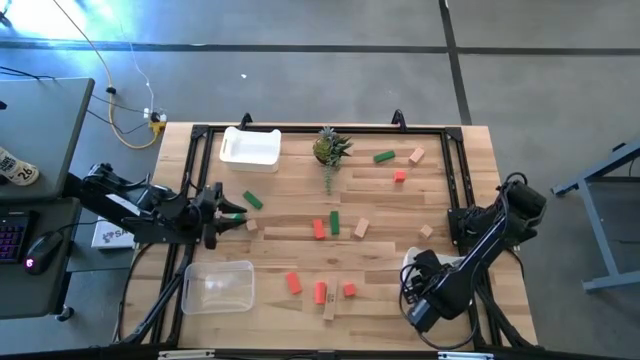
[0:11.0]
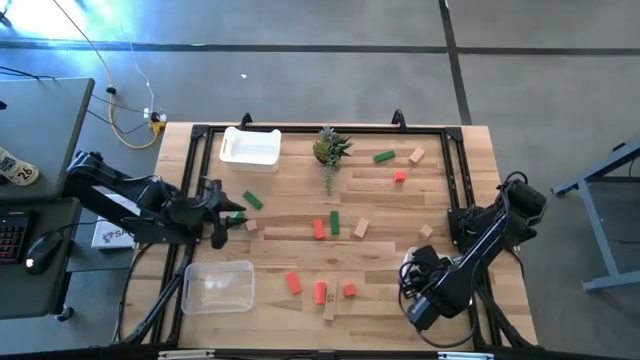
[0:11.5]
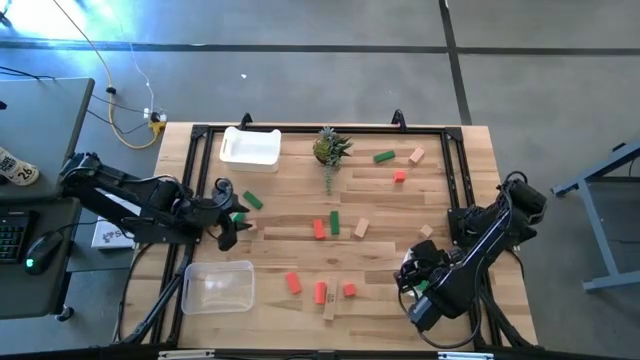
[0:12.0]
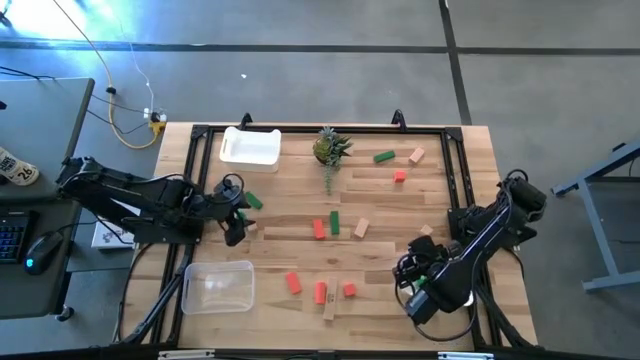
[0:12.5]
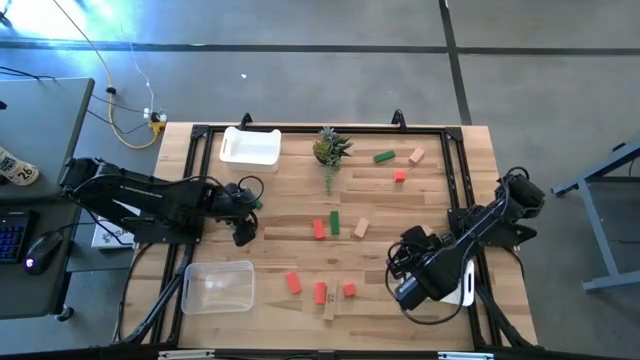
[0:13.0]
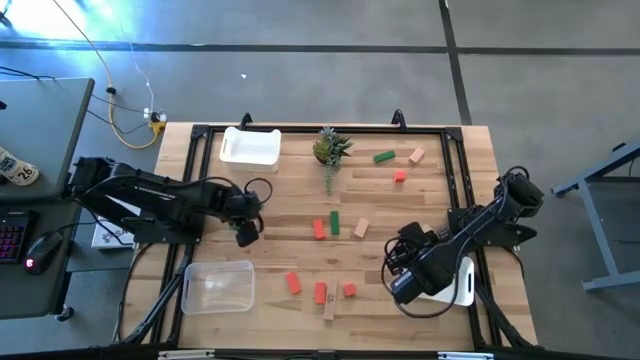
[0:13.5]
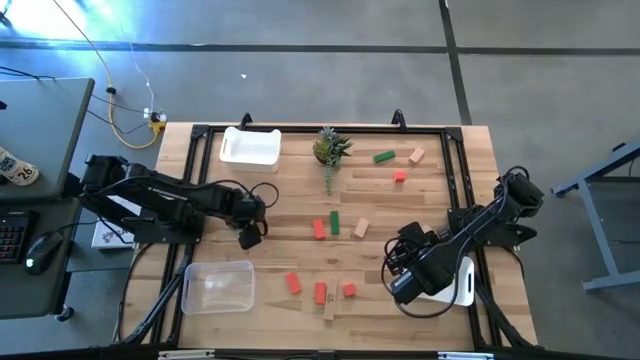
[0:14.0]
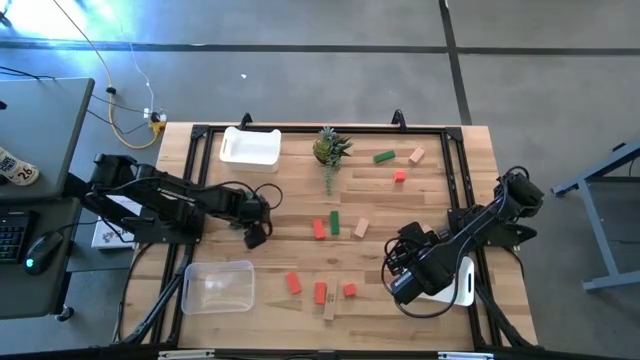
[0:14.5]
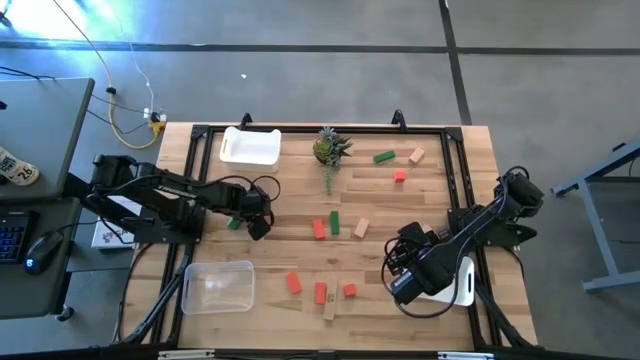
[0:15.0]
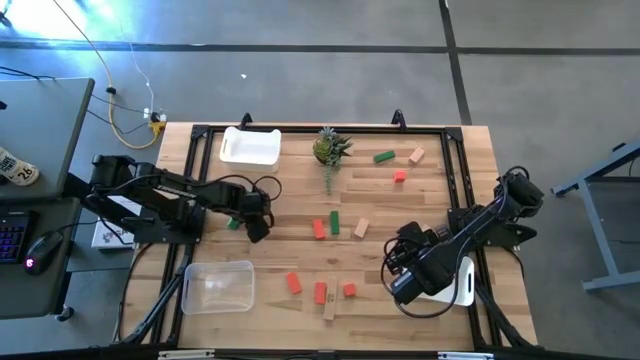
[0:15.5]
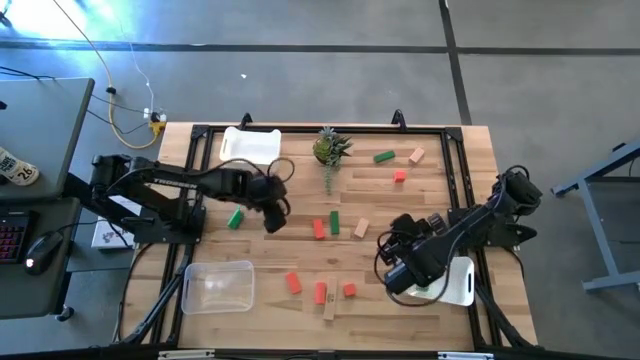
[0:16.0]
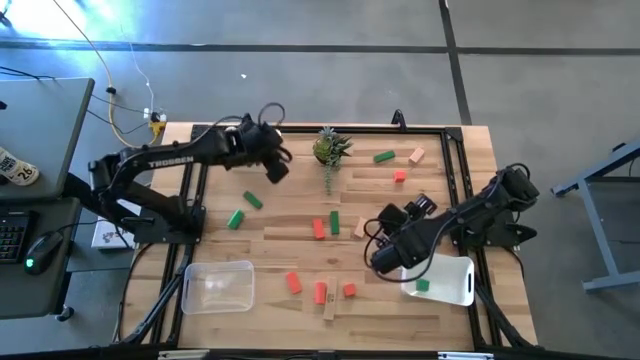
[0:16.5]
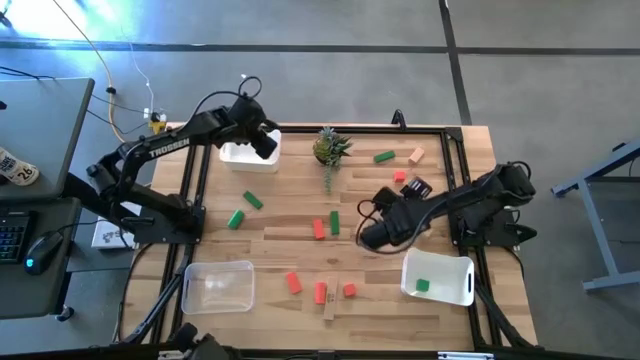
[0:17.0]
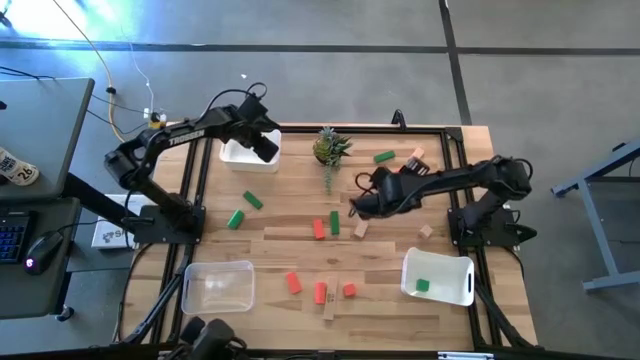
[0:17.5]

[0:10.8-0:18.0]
Task: Sort & place blocks by color
Put the brown block into the top white bin

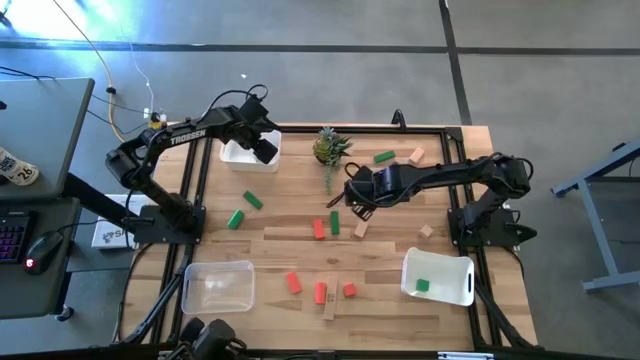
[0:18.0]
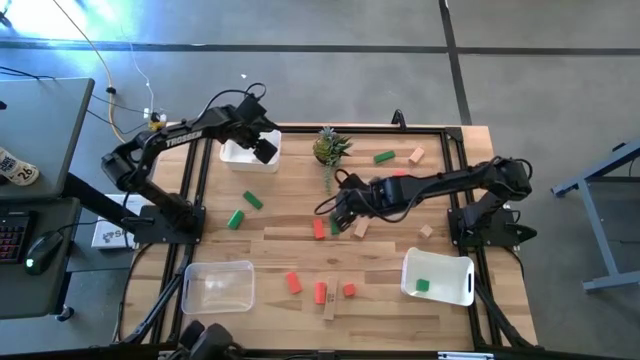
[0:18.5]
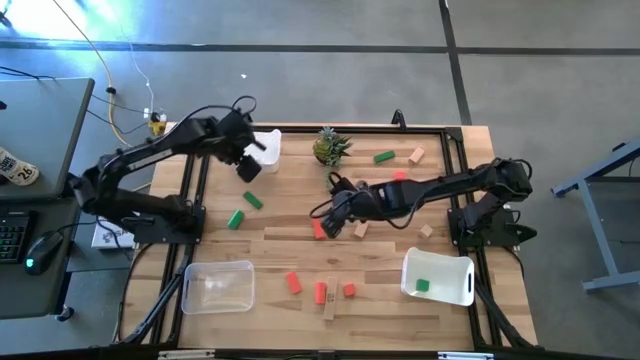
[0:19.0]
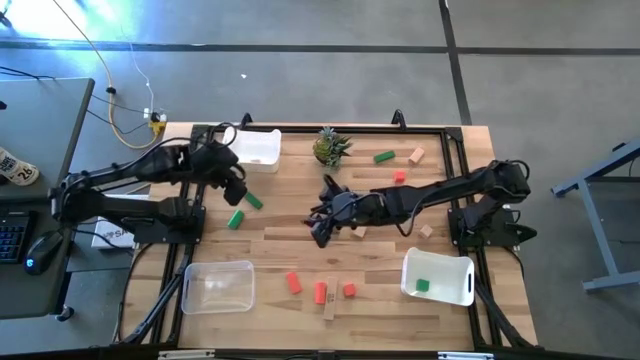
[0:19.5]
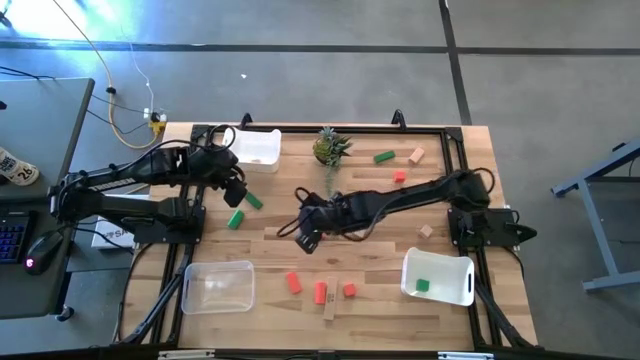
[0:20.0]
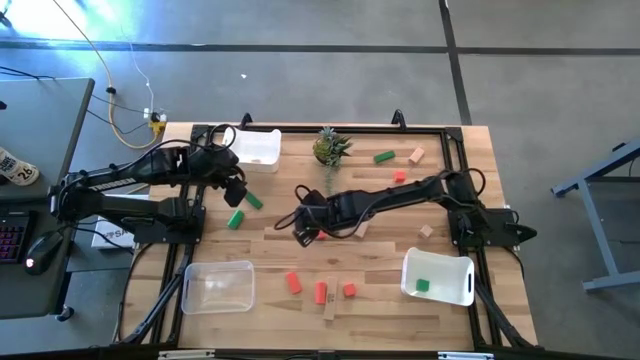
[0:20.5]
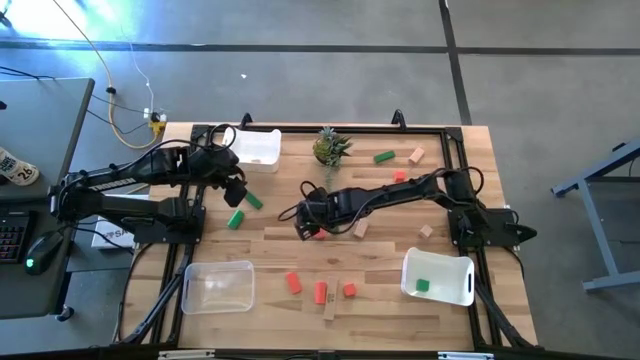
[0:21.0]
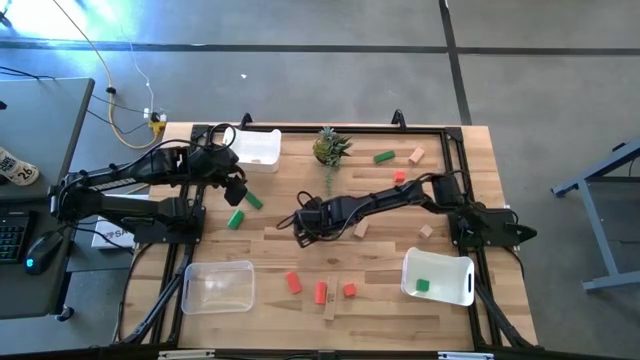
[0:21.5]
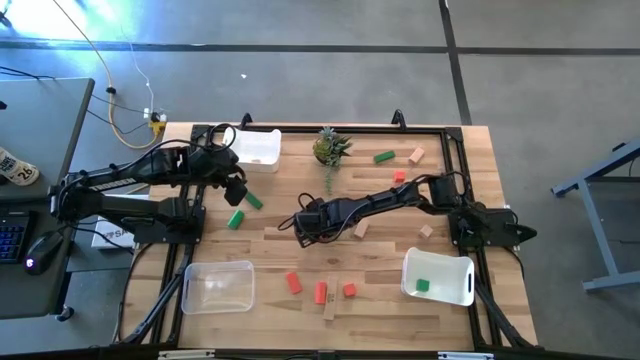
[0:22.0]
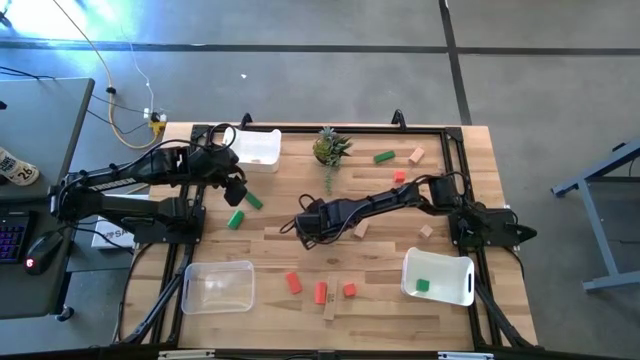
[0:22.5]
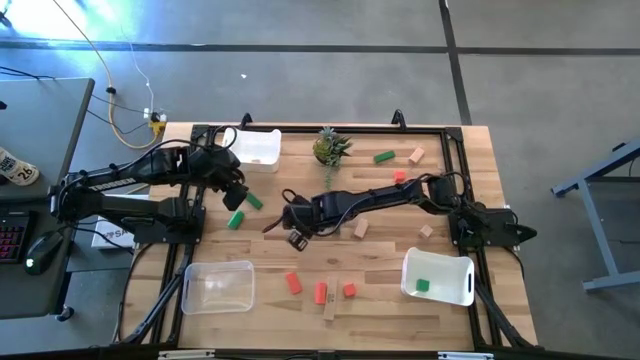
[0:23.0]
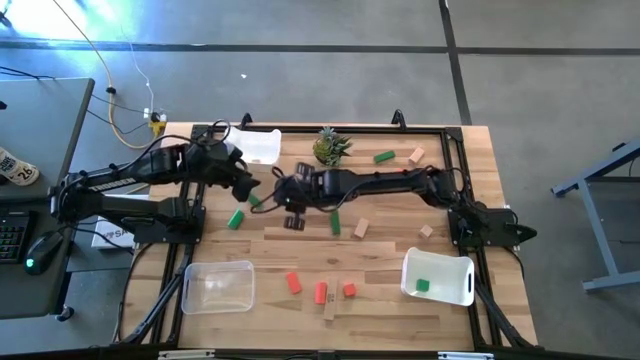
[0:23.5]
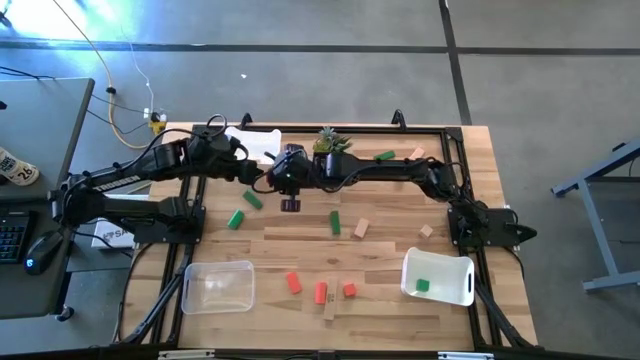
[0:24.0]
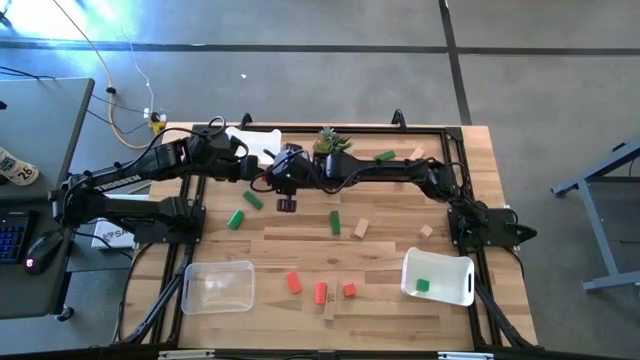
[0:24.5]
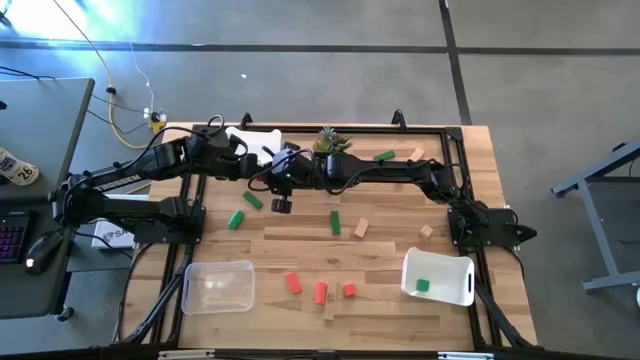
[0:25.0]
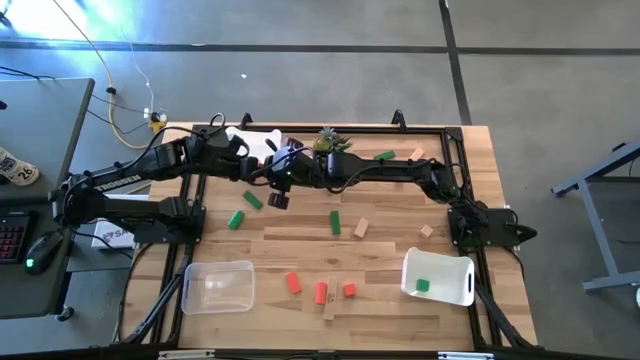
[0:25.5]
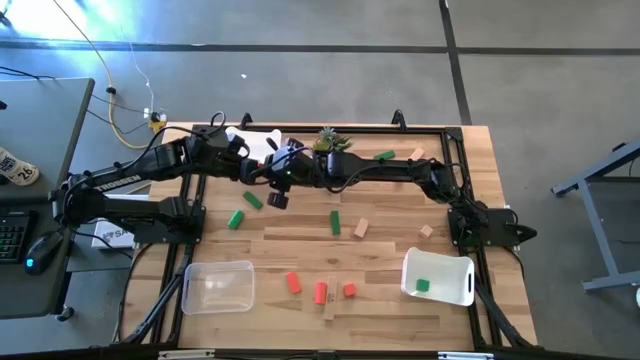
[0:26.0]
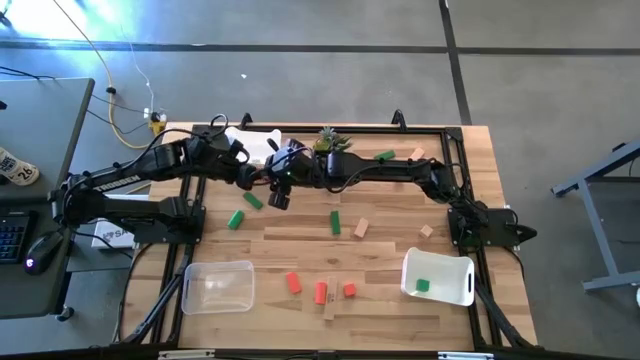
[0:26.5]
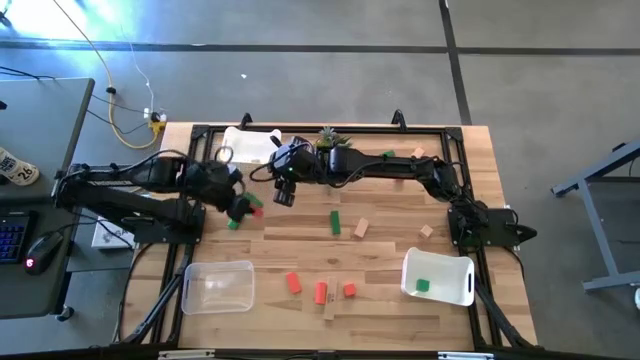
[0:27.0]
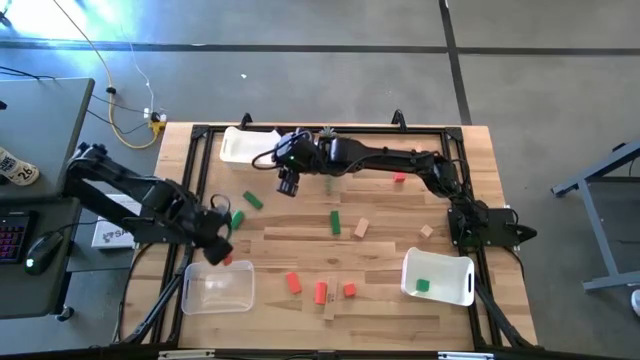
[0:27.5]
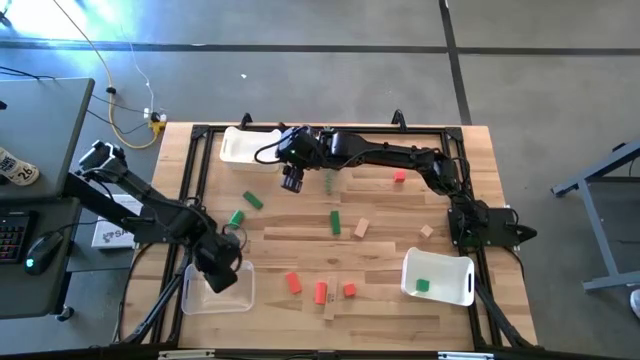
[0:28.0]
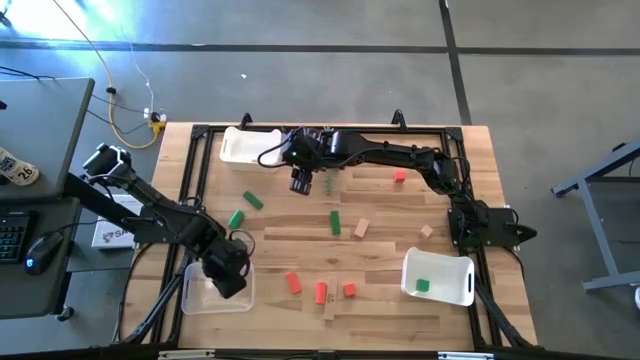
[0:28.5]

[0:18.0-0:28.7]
Put the orange block into the transparent bin

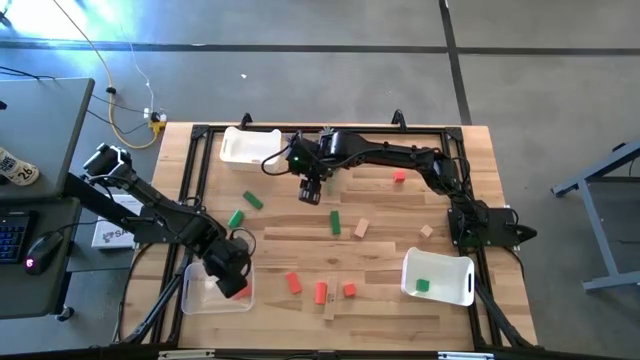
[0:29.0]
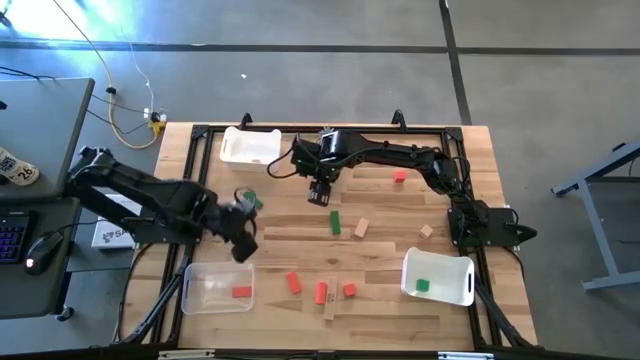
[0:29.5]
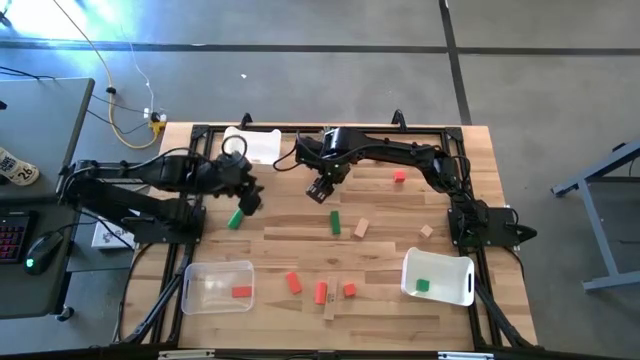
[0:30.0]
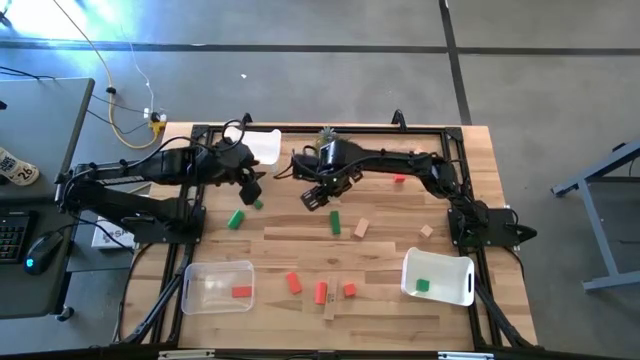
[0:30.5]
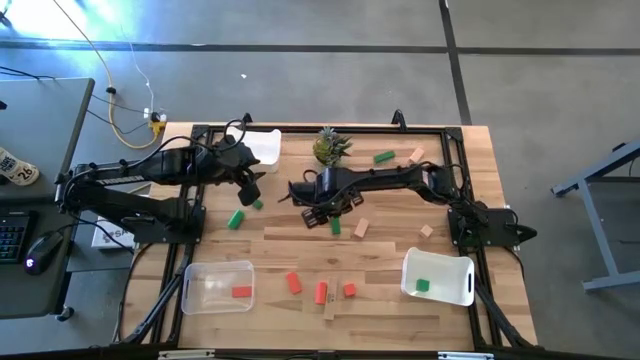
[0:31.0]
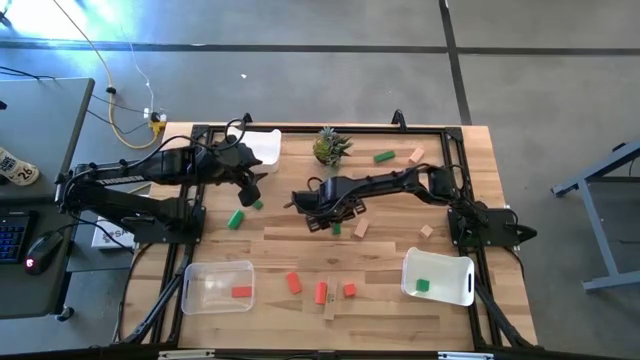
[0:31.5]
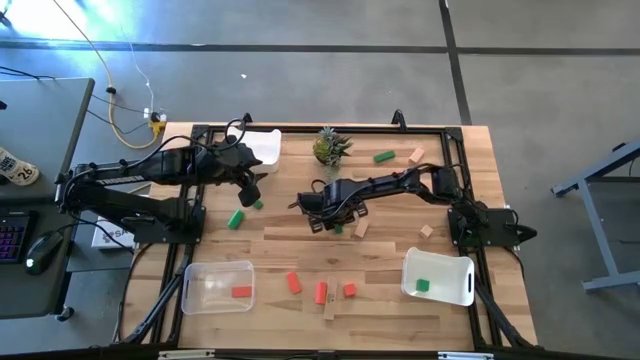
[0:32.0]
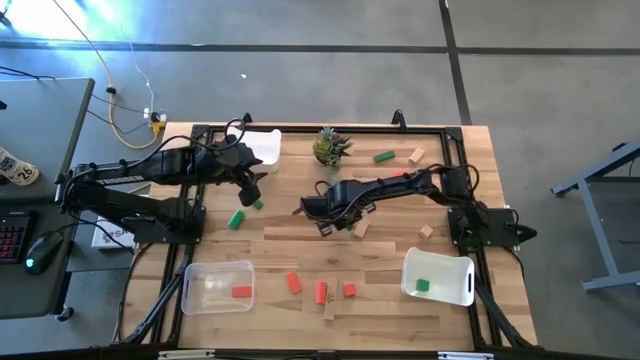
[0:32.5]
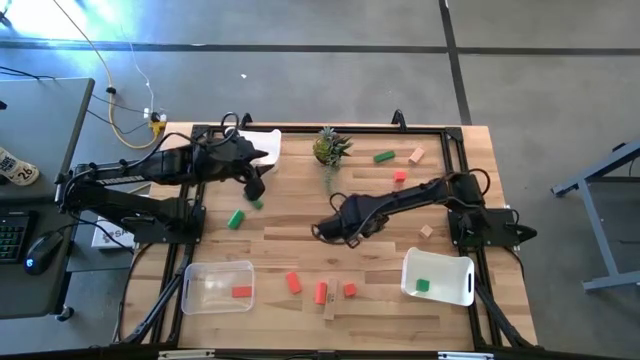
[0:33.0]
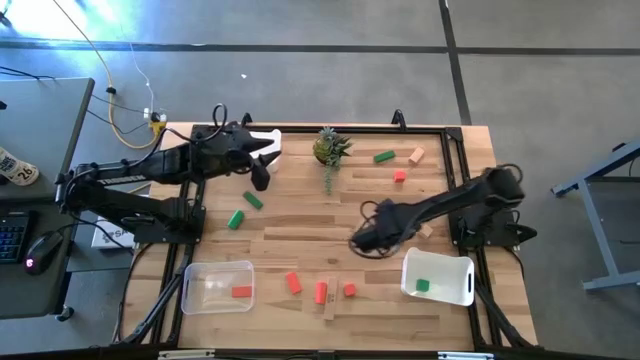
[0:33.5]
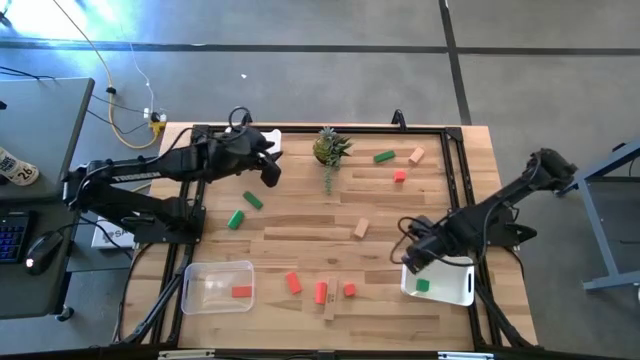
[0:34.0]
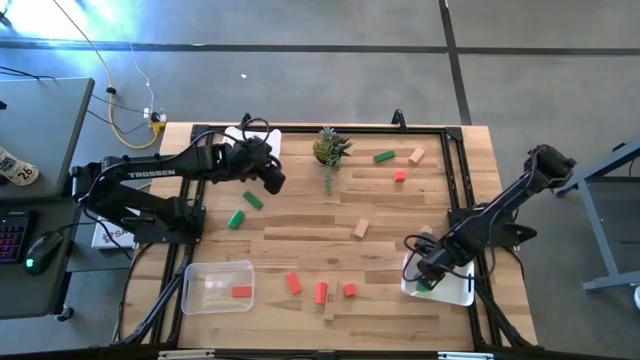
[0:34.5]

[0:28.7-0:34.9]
Put the green block into the bottom white bin
